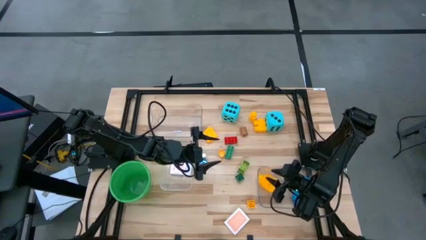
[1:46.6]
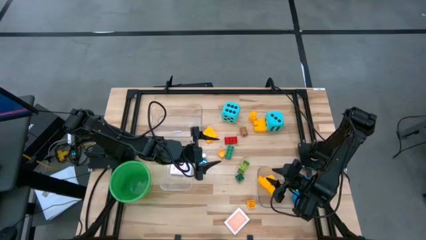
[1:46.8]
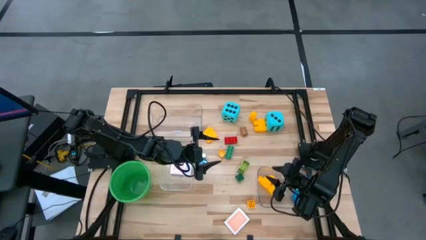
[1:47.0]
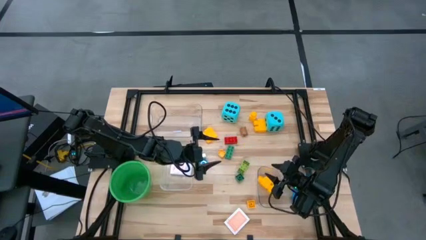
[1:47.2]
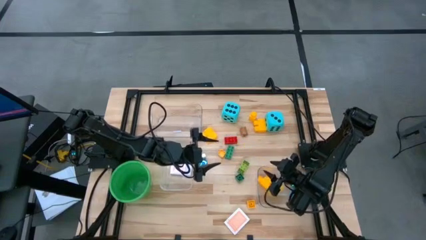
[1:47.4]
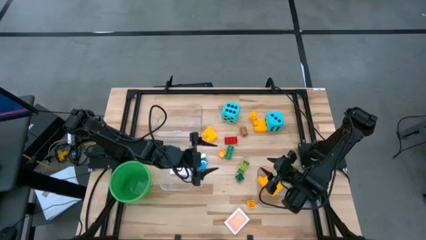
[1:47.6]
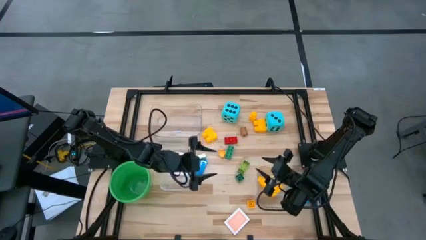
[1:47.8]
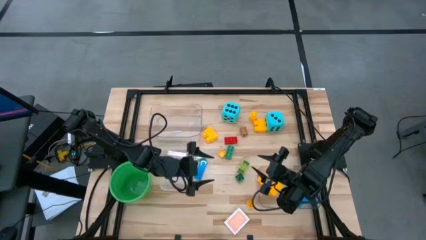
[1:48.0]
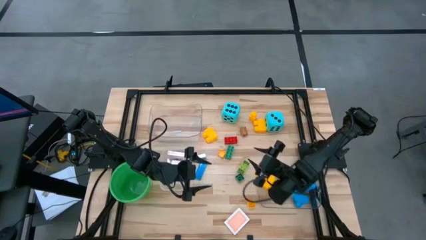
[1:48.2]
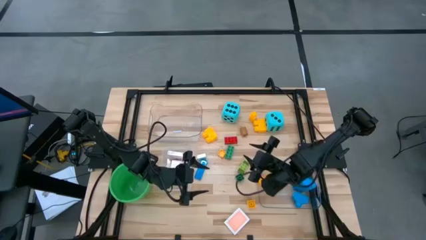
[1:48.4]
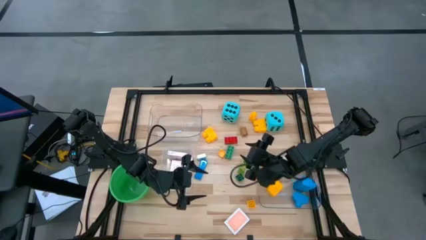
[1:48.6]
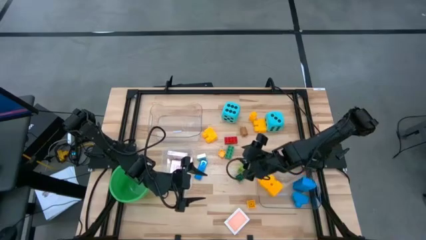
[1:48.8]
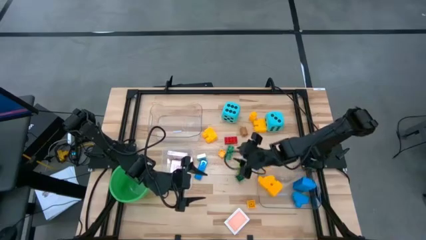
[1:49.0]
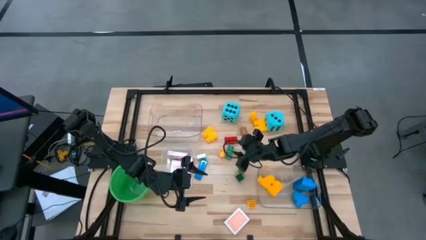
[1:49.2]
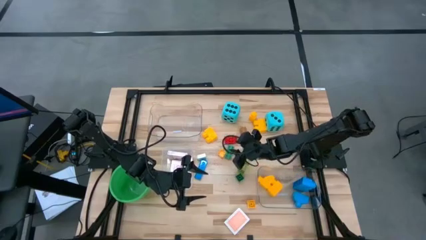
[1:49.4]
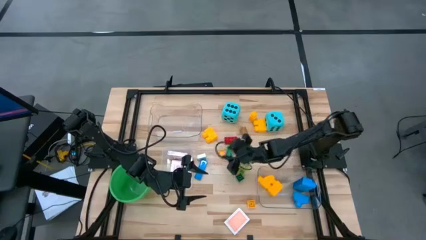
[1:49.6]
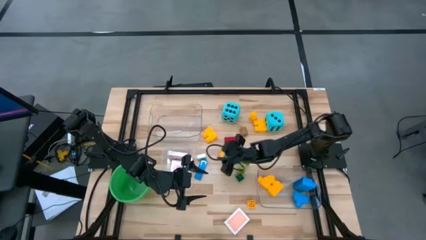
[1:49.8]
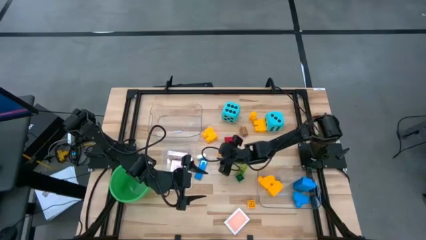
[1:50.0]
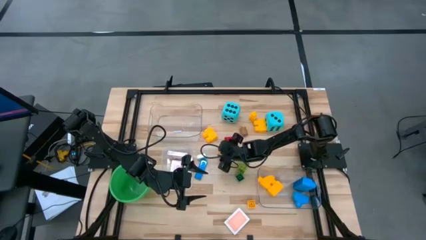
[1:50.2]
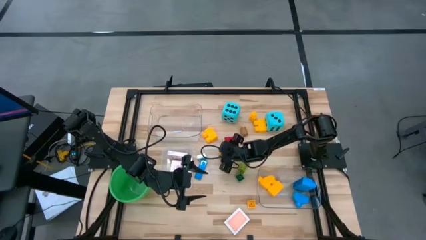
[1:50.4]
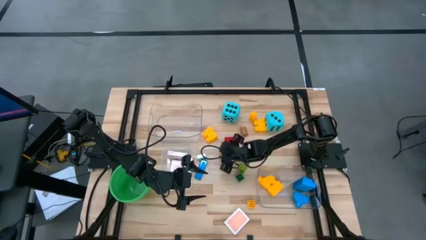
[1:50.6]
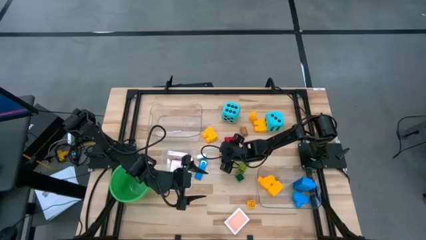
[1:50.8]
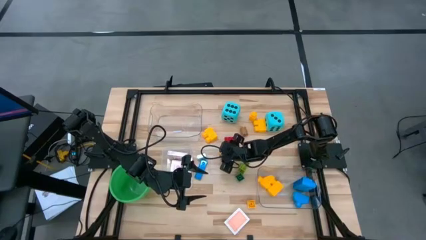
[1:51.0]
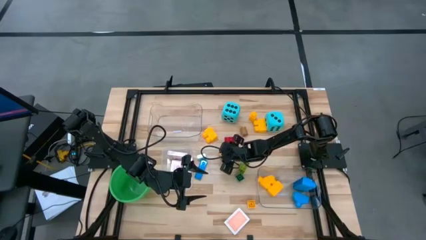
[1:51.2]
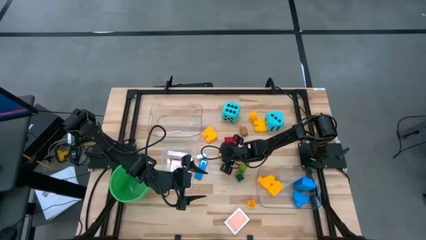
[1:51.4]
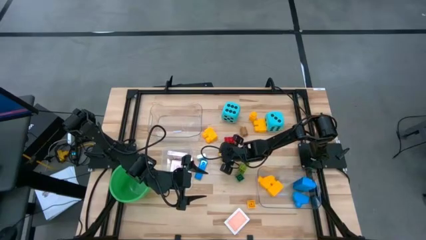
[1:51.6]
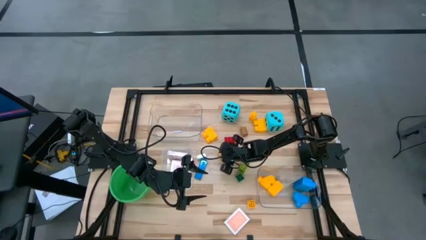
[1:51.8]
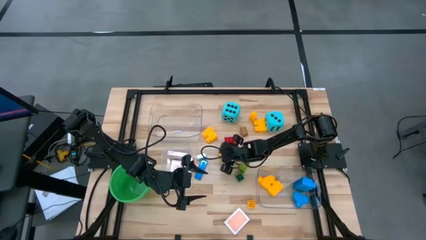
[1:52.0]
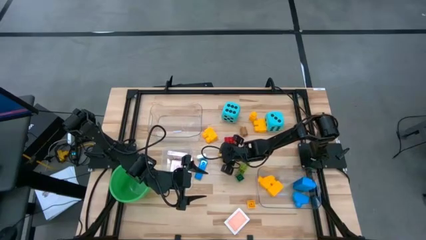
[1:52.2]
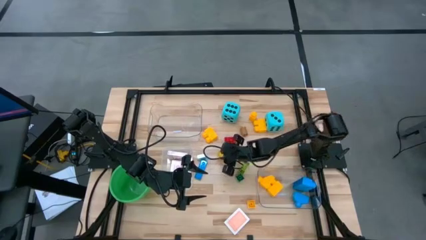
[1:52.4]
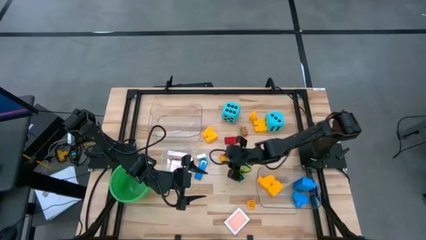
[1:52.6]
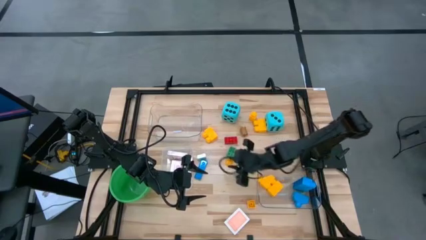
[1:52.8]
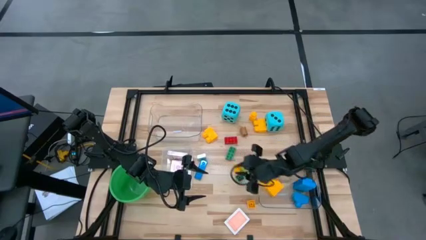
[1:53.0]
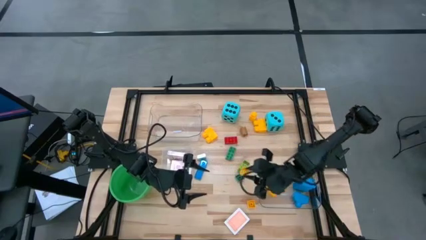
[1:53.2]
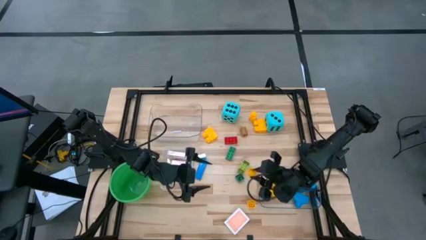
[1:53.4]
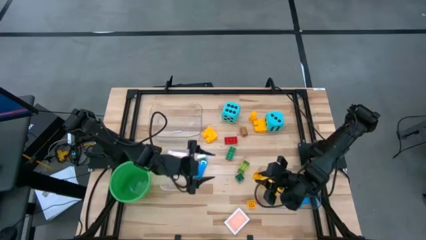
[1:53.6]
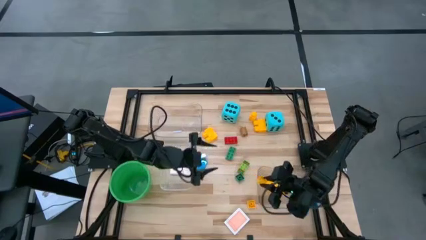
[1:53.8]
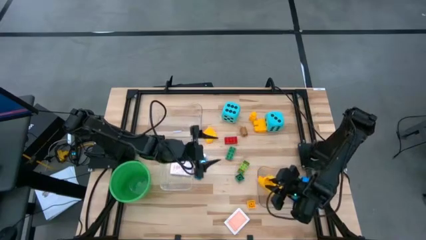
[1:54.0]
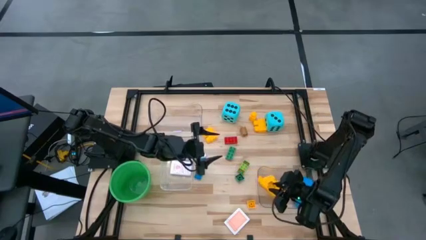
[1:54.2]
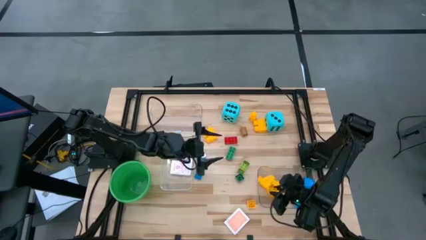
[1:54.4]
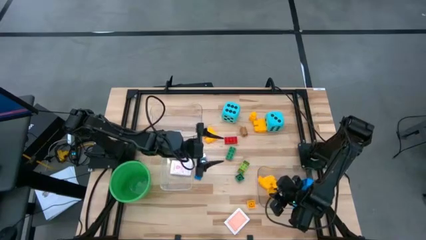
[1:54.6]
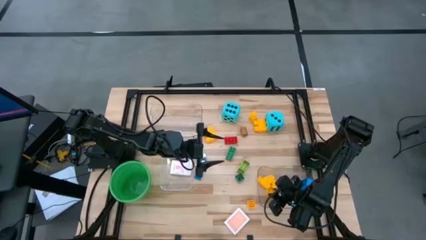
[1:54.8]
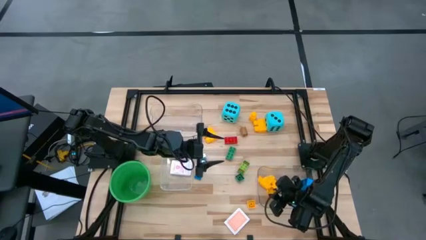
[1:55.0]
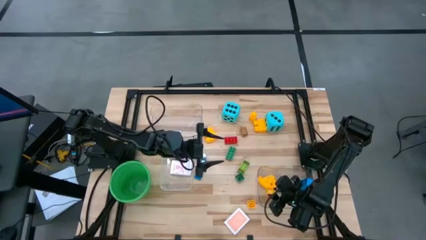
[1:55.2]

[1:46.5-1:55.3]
Task: Pick & Place Toys
Put the yellow game piece into the bottom right transparent bin

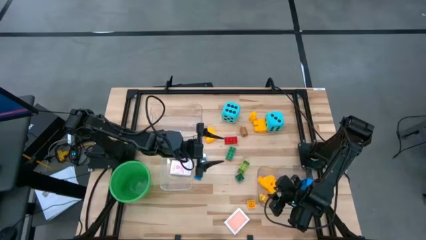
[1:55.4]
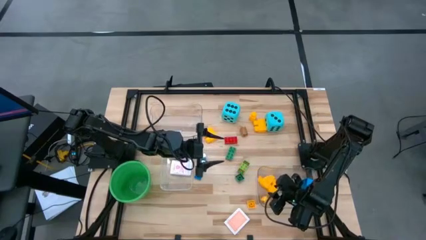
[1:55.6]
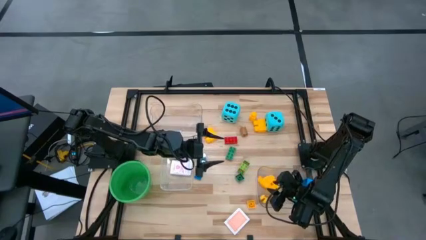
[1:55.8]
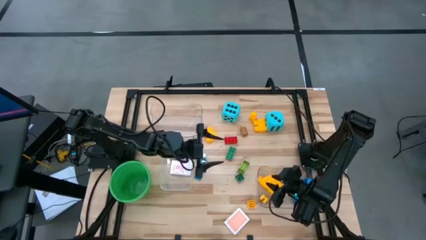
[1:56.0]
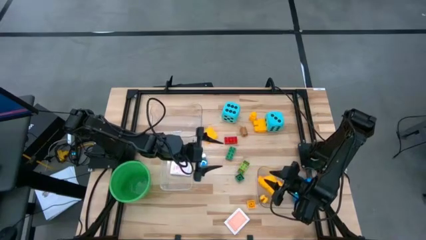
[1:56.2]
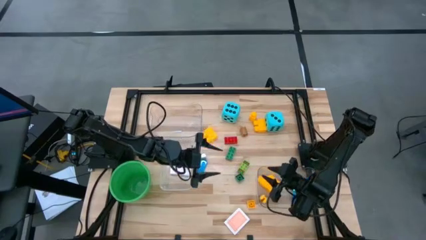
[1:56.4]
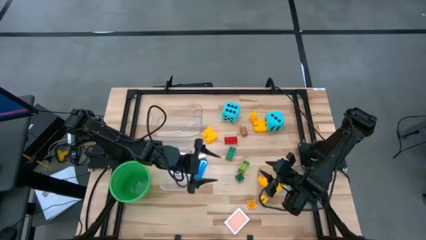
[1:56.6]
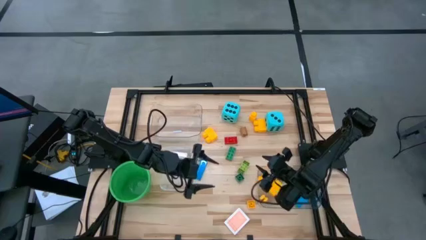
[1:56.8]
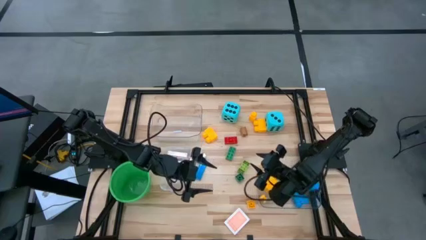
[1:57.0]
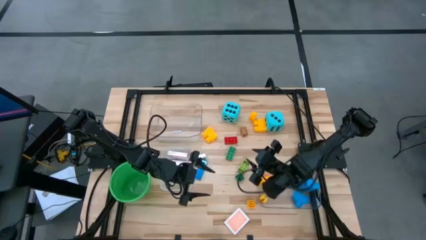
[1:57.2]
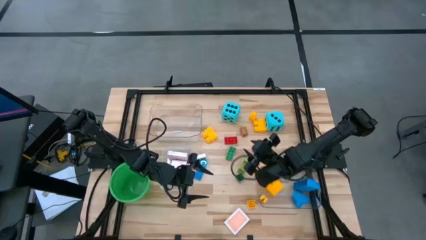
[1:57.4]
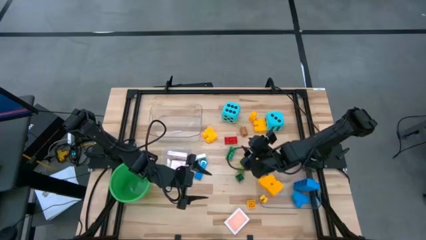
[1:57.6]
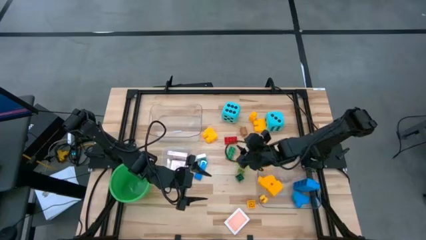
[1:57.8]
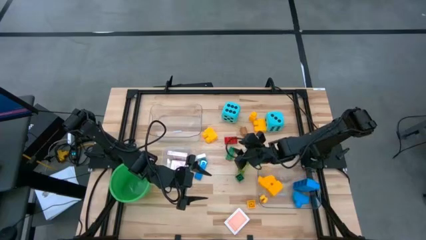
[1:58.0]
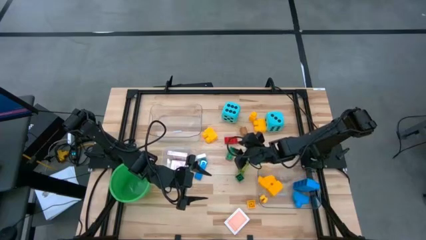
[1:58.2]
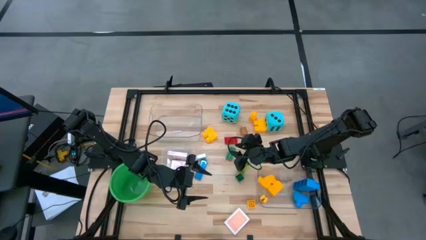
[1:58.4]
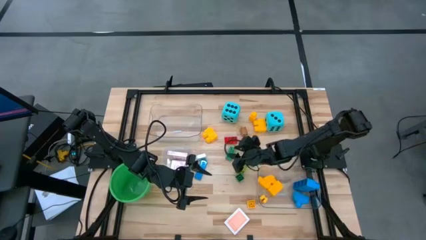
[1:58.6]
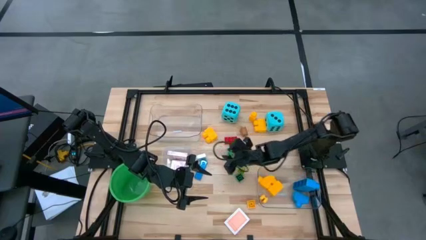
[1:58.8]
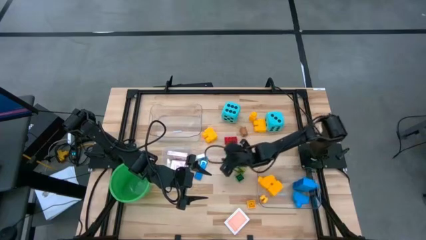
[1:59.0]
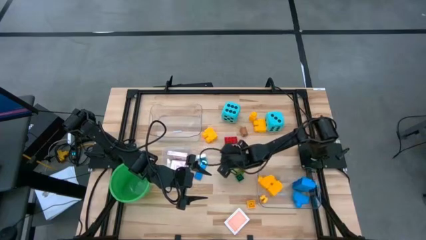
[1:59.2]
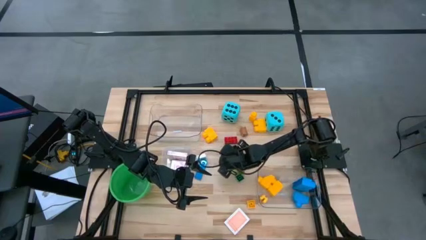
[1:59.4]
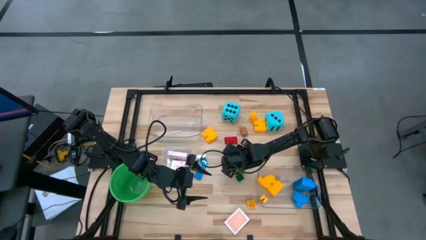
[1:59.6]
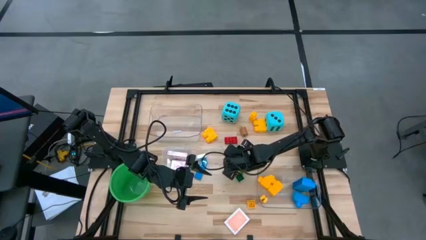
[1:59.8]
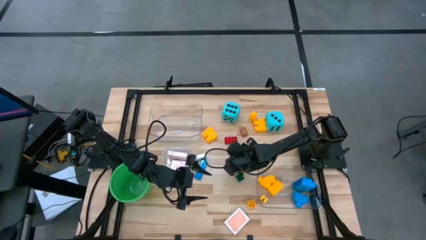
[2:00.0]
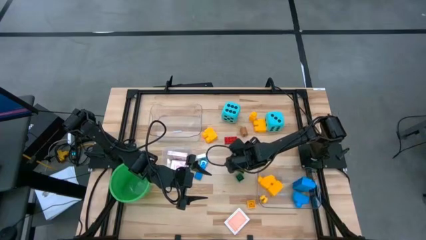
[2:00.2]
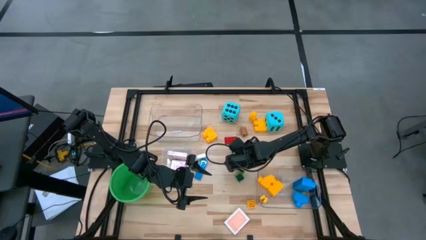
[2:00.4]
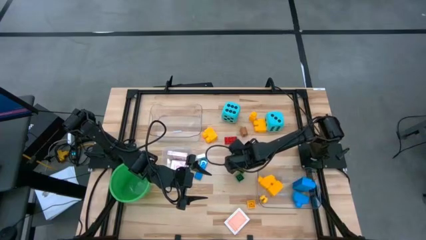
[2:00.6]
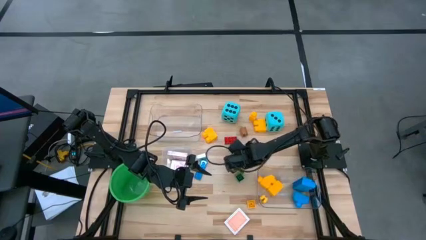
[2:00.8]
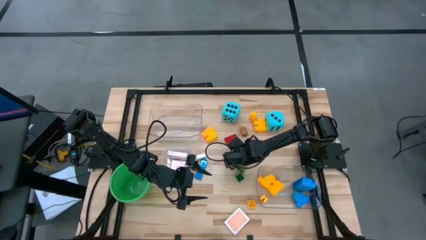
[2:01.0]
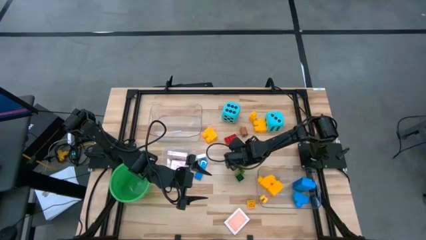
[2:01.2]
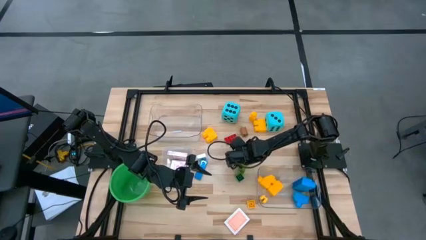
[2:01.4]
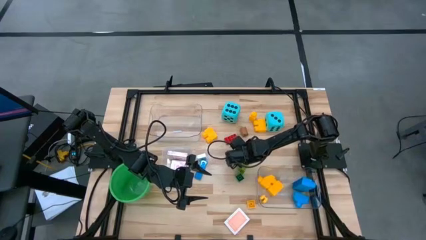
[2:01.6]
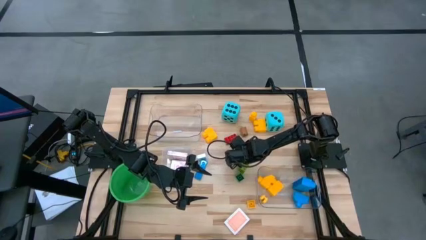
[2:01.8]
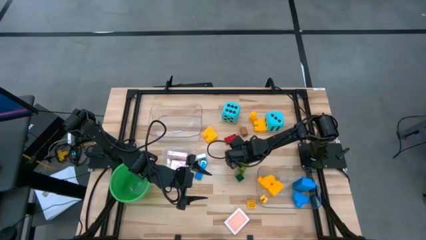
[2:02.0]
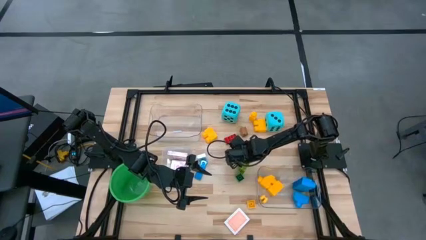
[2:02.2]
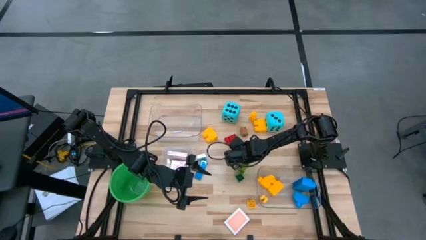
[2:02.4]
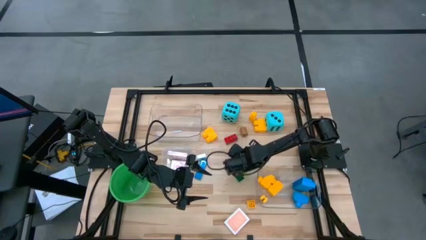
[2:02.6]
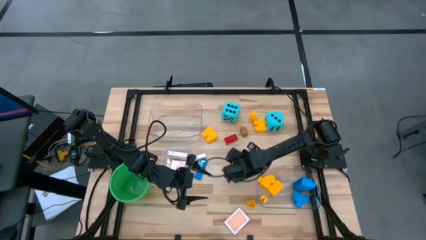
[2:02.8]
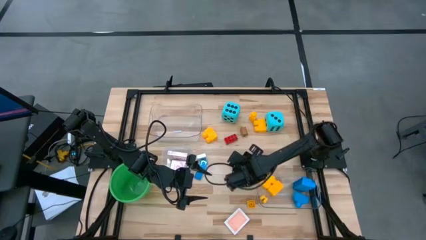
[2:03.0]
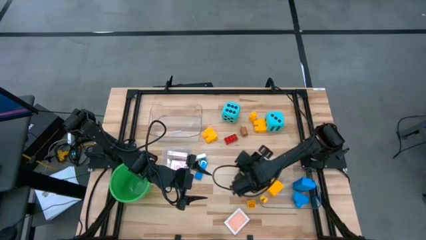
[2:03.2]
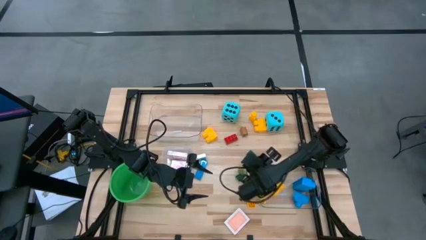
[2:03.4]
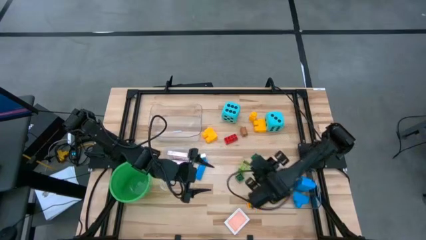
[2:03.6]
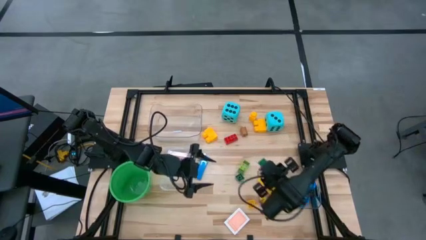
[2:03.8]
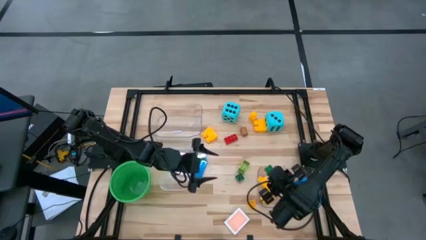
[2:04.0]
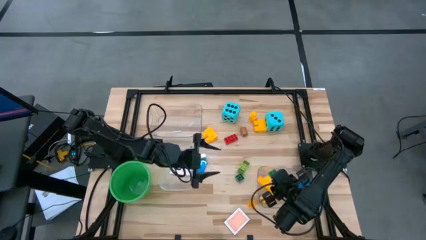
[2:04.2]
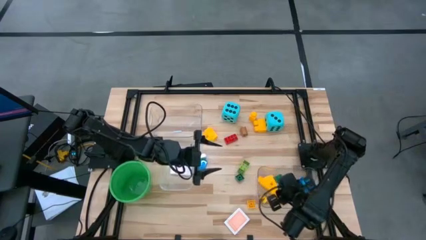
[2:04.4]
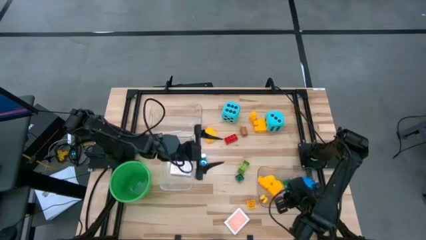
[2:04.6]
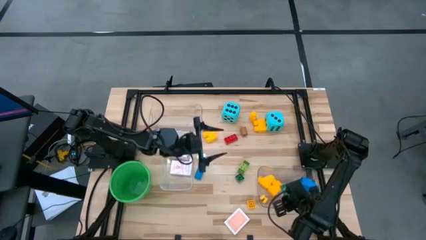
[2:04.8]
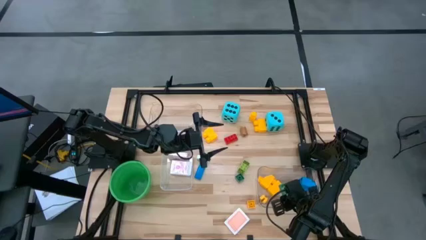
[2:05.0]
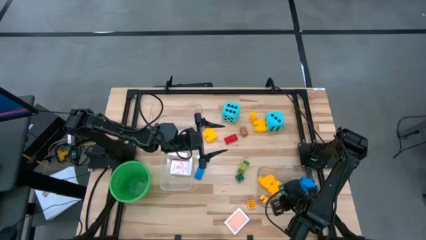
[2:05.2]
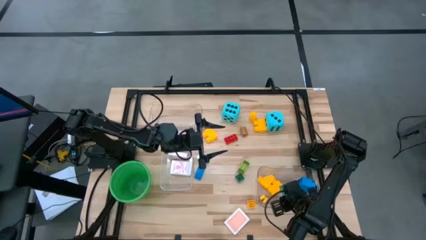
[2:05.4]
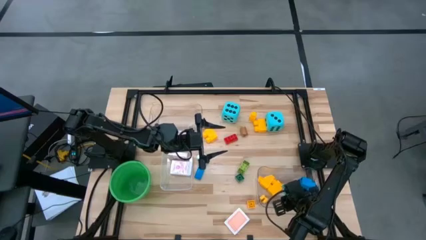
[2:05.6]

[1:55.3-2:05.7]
Put the green game piece into the bottom right transparent bin
